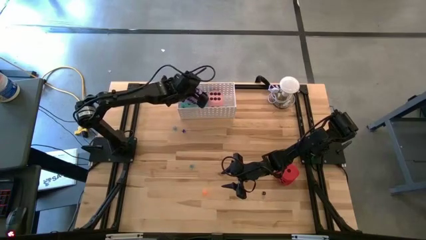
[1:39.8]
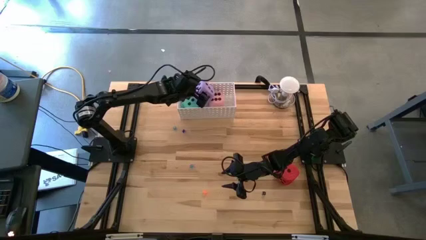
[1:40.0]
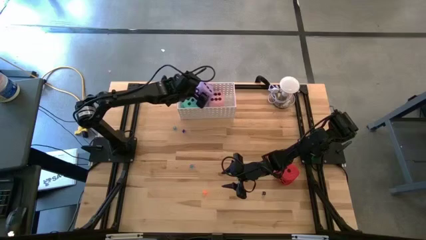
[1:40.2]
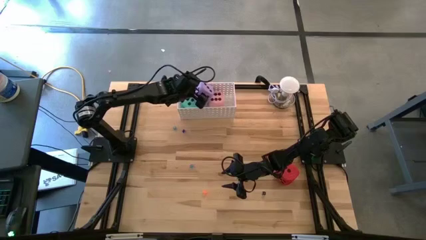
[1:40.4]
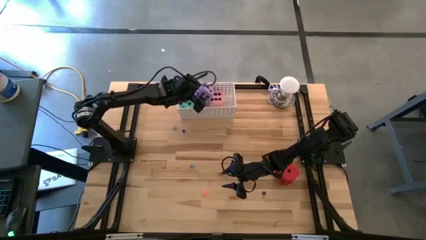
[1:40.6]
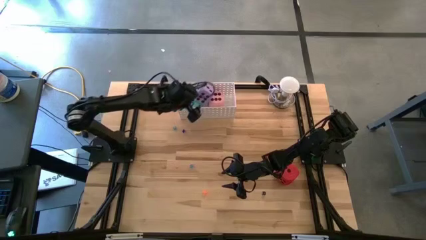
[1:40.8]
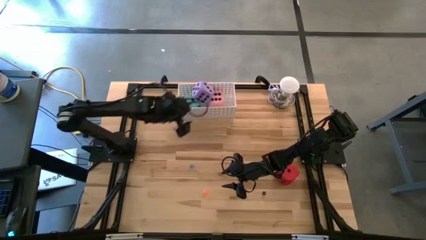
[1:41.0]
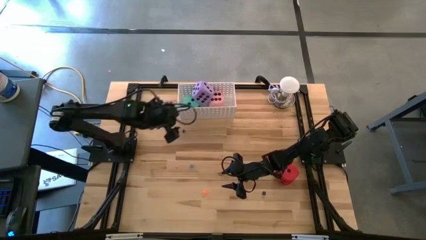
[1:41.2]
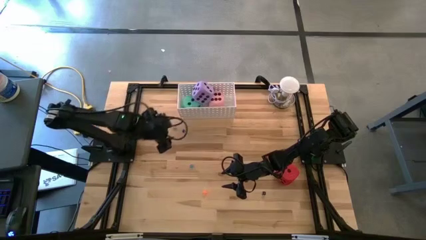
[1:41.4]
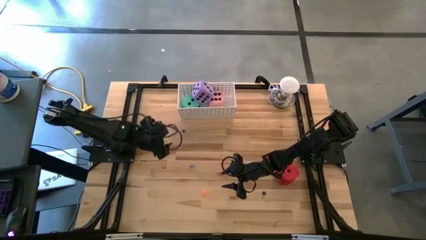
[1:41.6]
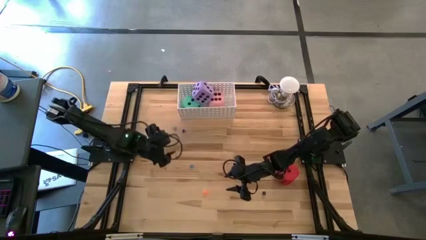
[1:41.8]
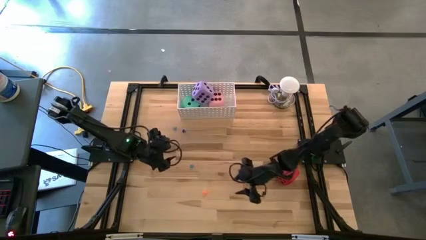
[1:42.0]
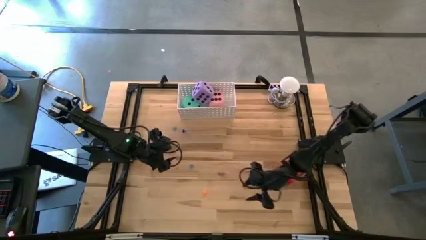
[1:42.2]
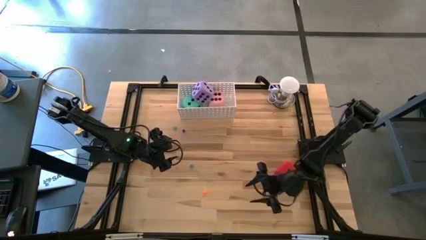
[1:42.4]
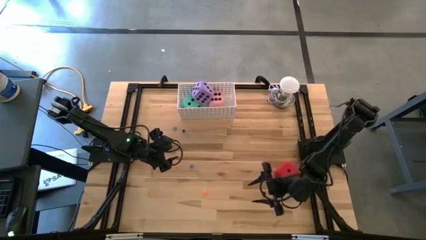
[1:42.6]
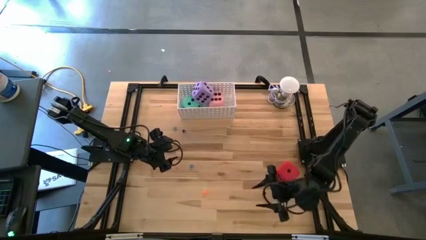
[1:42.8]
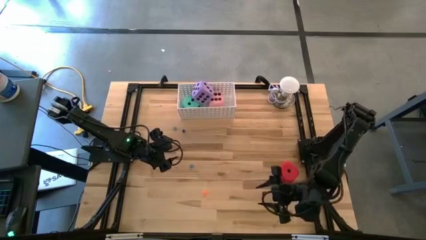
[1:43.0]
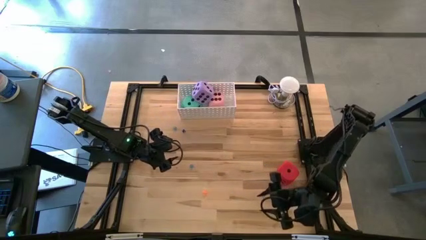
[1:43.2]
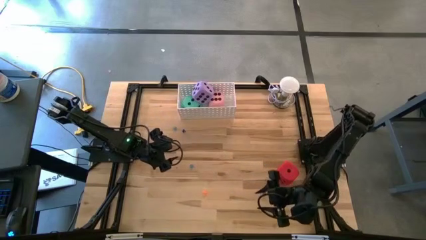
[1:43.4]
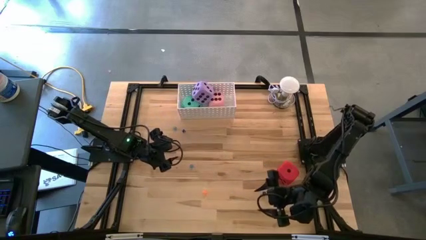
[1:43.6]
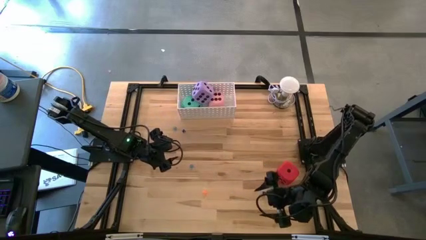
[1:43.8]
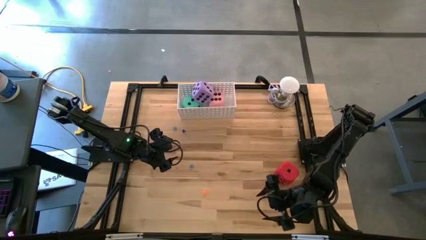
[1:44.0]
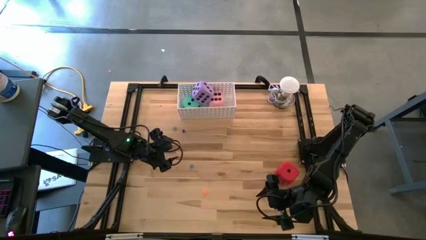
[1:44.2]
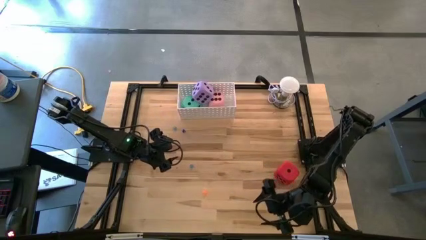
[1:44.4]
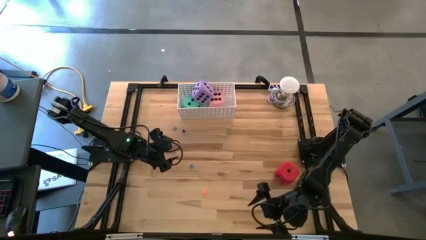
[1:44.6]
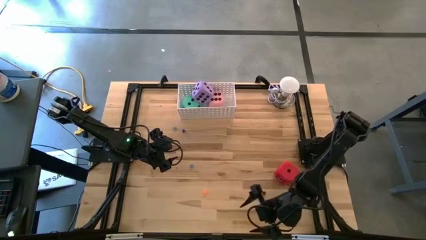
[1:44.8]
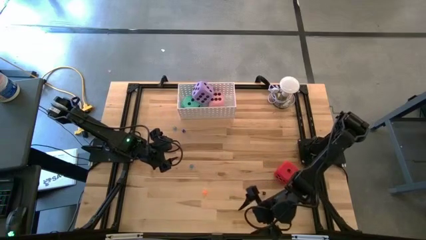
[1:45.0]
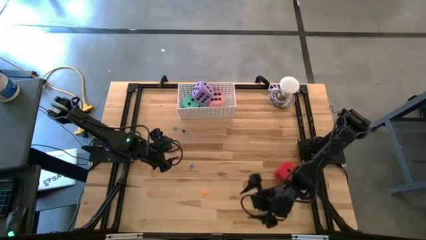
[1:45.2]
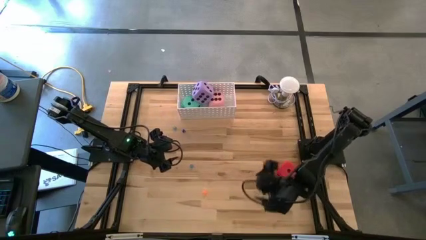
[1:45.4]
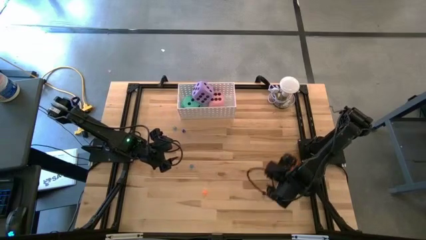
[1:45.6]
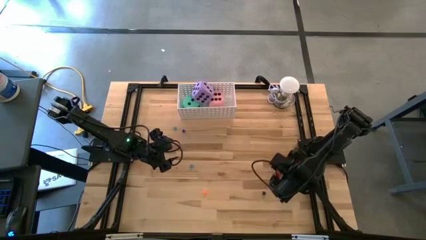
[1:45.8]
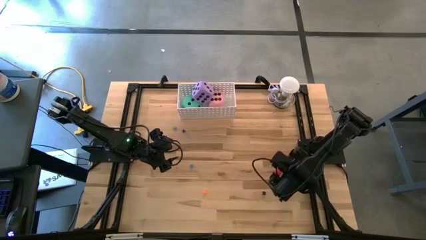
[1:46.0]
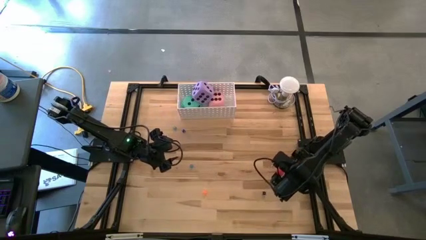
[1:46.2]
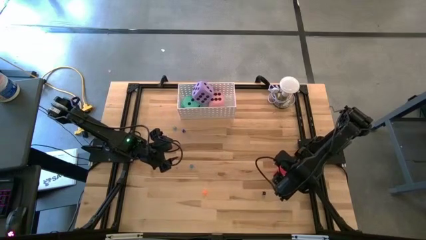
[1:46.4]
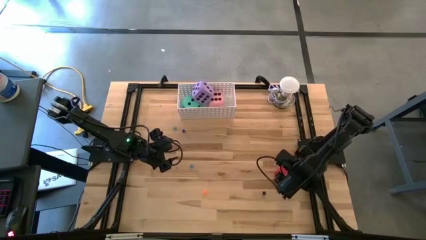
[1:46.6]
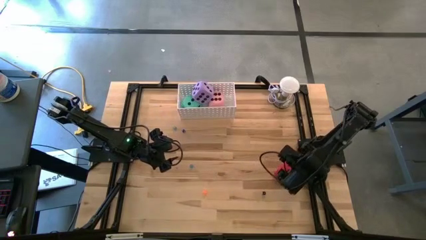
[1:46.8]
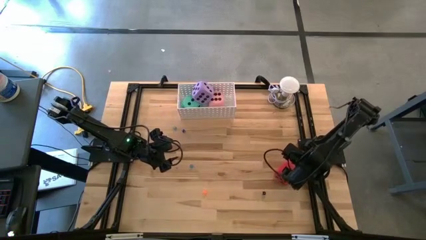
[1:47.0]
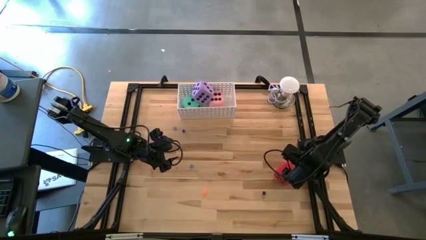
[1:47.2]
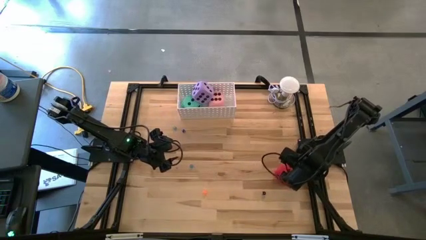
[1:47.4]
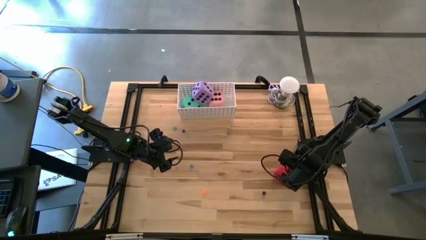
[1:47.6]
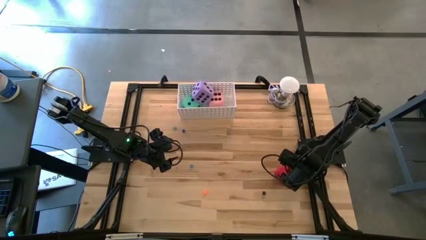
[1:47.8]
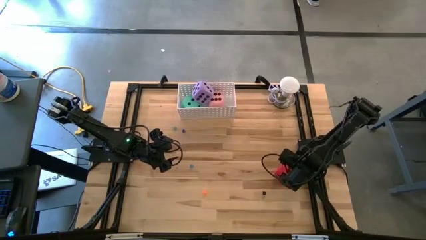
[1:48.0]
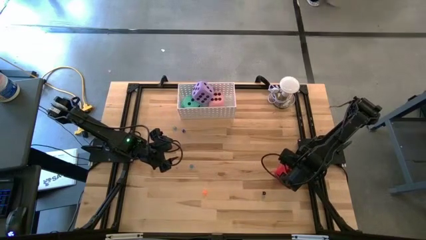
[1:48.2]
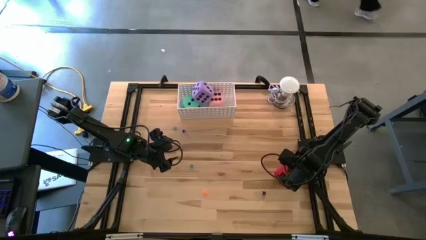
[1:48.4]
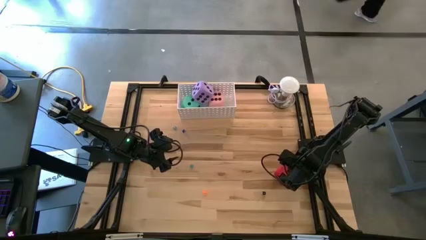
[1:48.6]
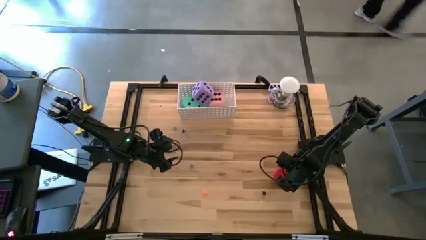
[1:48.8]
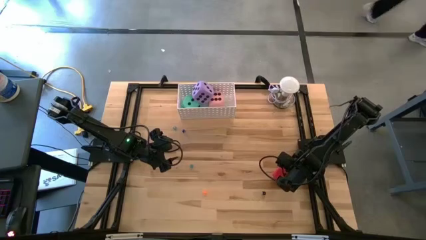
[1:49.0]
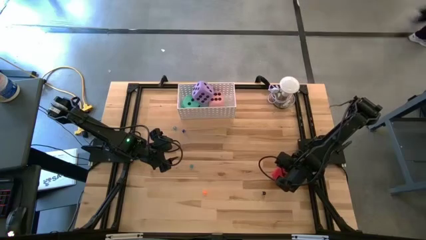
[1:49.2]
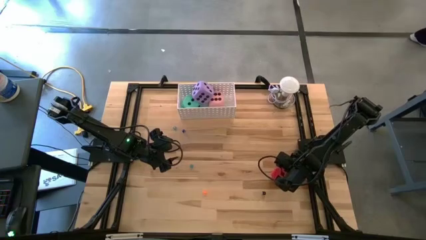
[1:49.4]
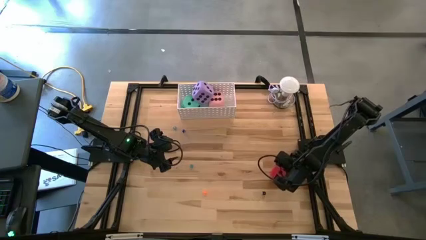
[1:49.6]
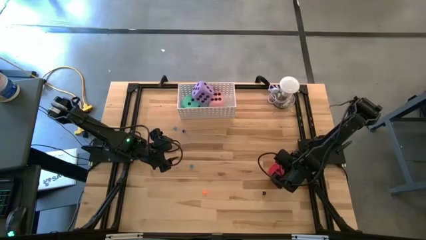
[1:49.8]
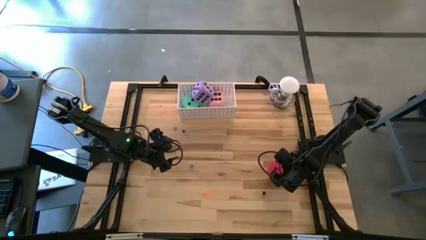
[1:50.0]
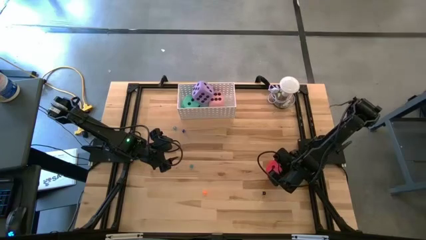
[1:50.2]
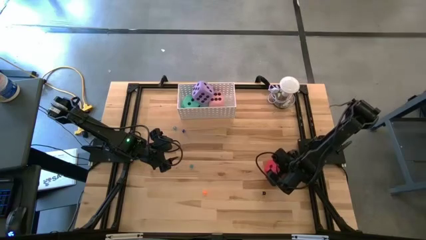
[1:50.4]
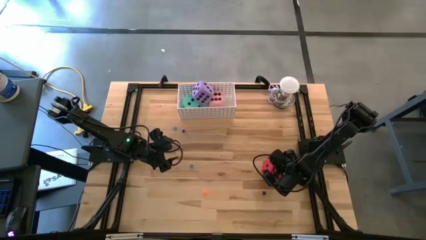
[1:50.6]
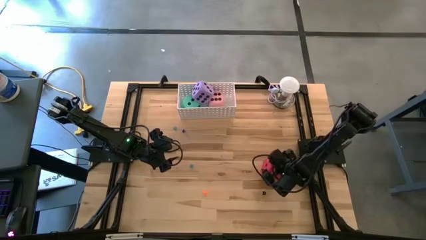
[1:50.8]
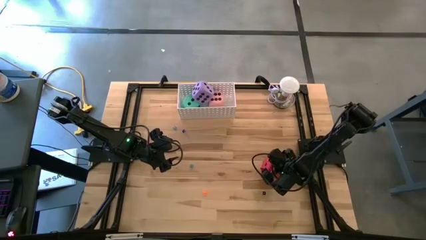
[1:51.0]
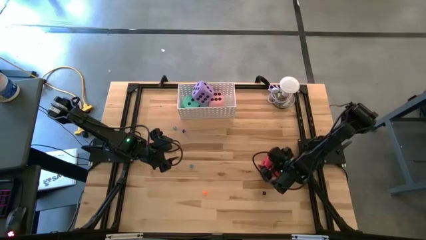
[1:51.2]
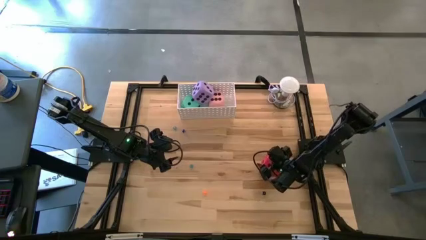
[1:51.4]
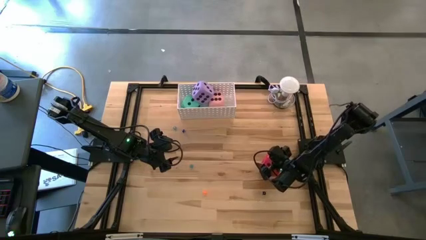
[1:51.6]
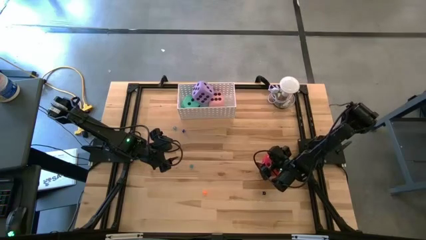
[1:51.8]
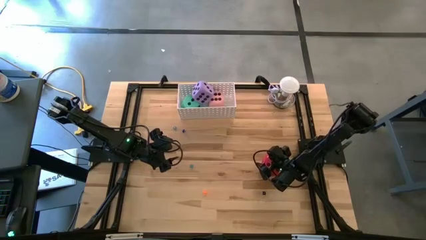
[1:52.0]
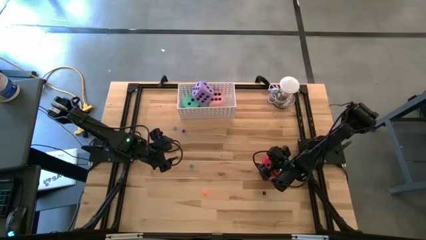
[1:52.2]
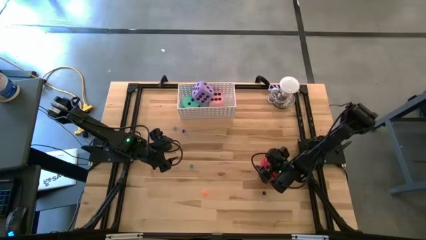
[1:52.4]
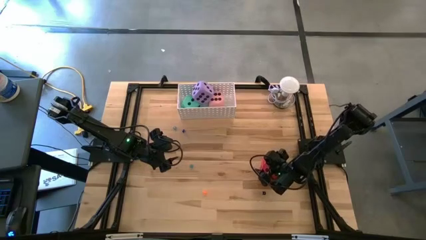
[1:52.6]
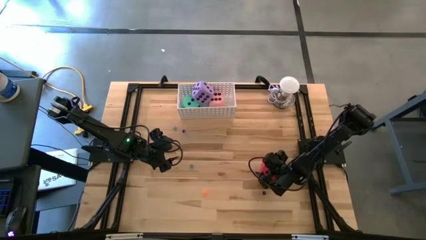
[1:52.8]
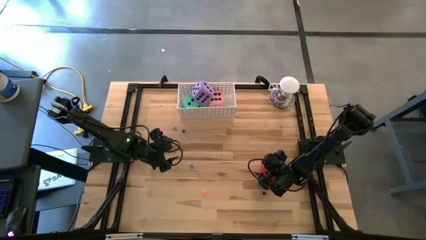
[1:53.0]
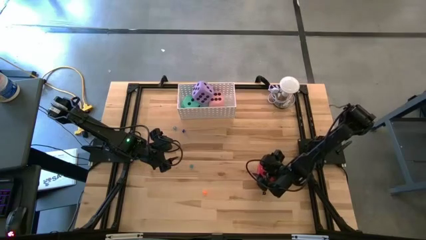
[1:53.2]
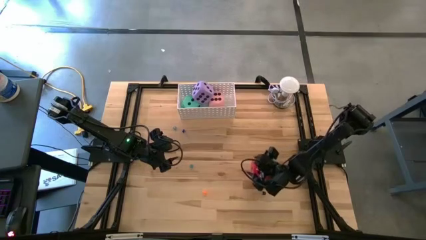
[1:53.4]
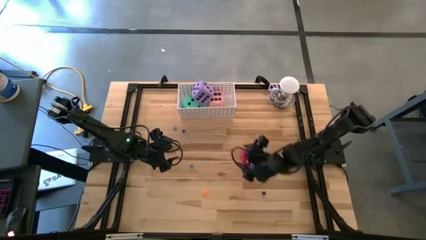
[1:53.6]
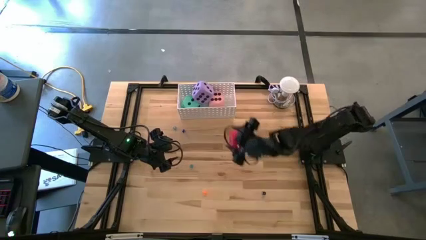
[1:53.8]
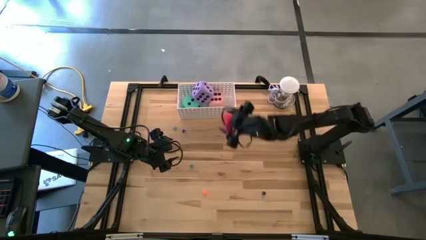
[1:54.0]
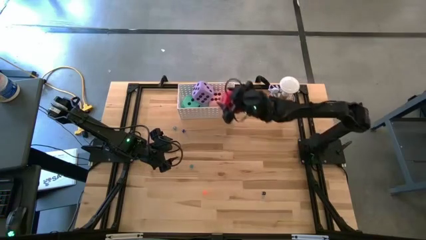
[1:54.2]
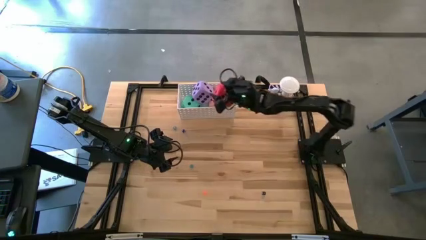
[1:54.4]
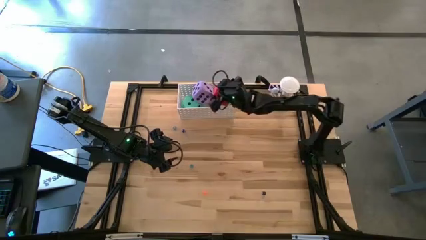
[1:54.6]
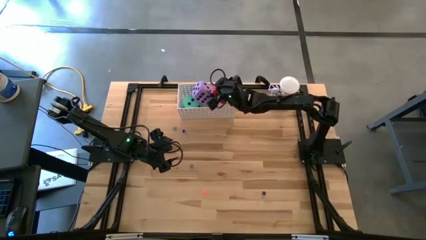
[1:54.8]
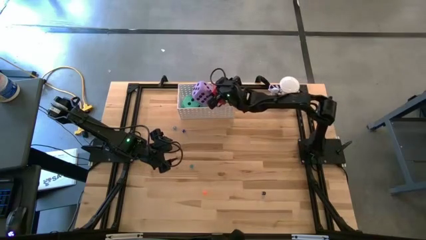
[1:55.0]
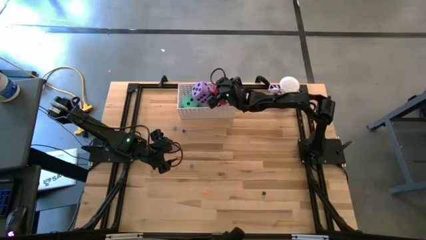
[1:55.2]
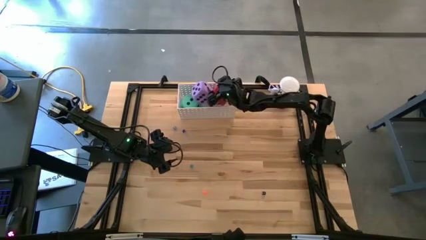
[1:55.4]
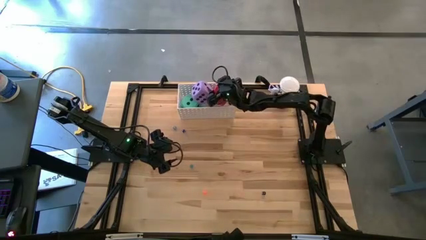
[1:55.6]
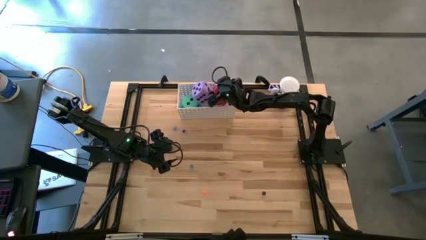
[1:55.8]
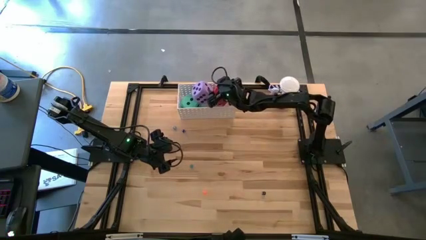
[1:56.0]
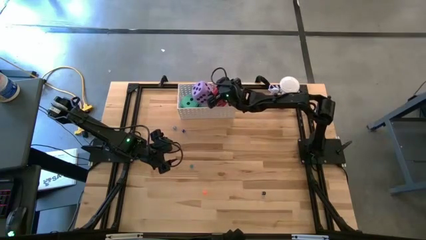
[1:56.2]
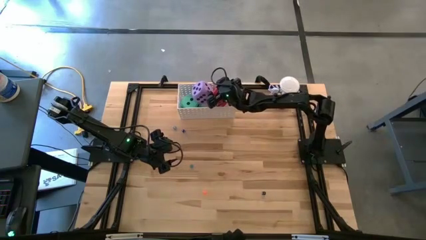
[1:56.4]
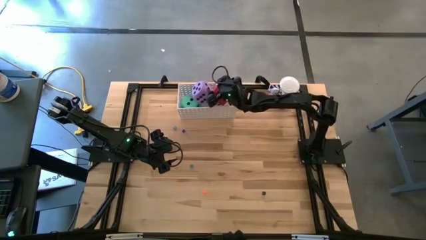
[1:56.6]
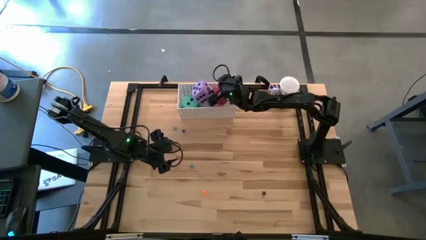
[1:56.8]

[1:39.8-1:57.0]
Task: Pick & Place Dice
Put the large red dice into the white basket
